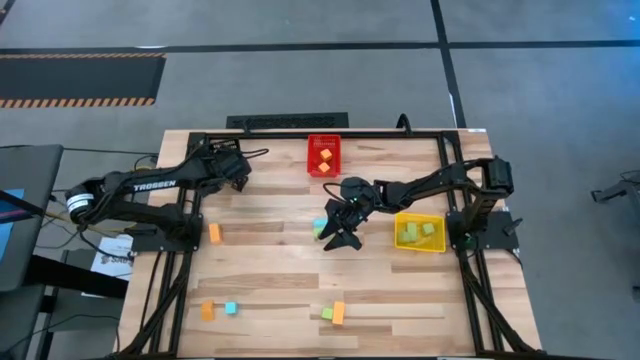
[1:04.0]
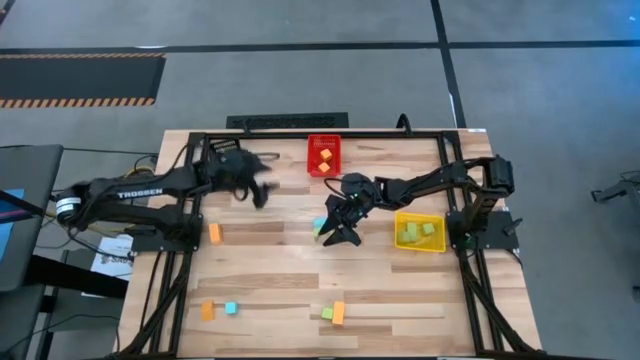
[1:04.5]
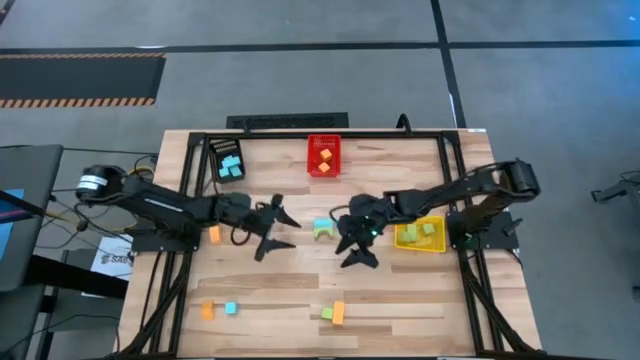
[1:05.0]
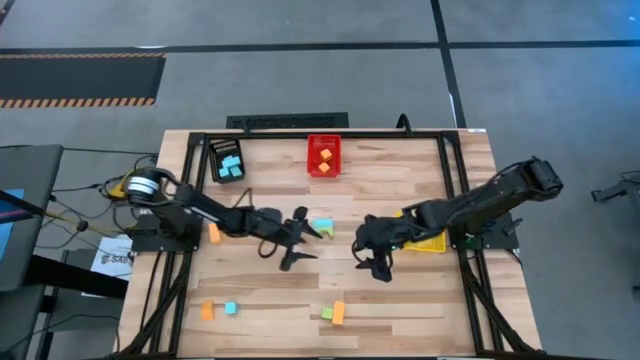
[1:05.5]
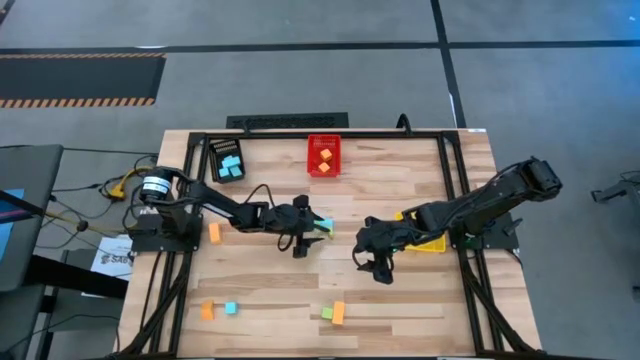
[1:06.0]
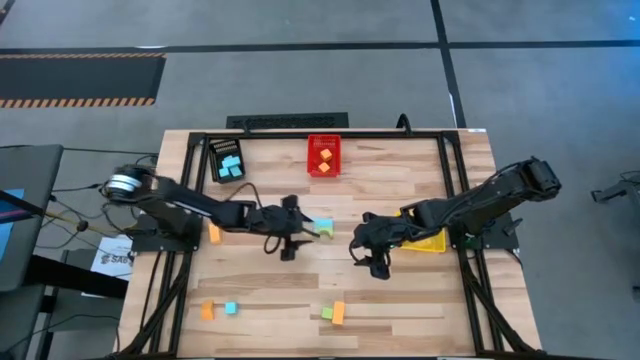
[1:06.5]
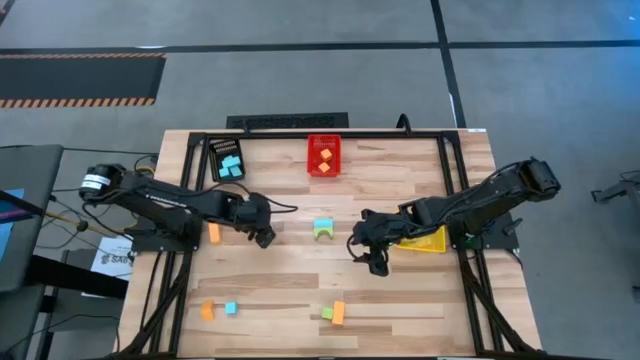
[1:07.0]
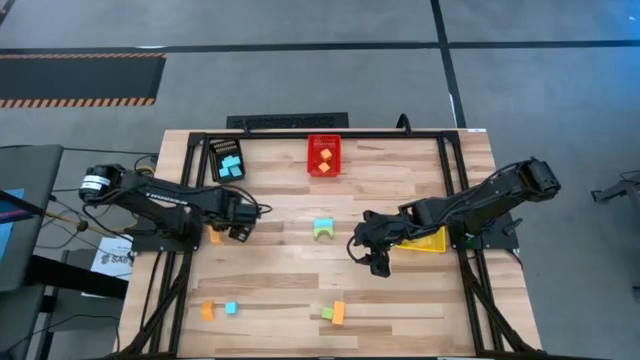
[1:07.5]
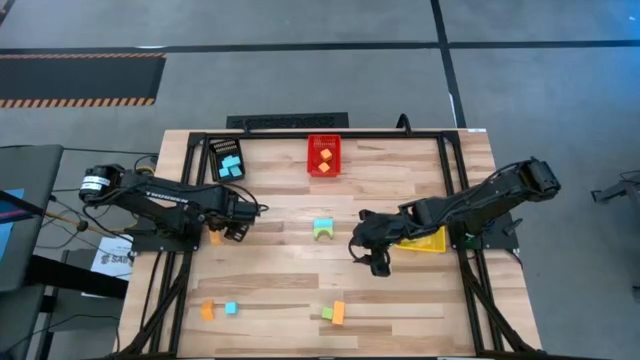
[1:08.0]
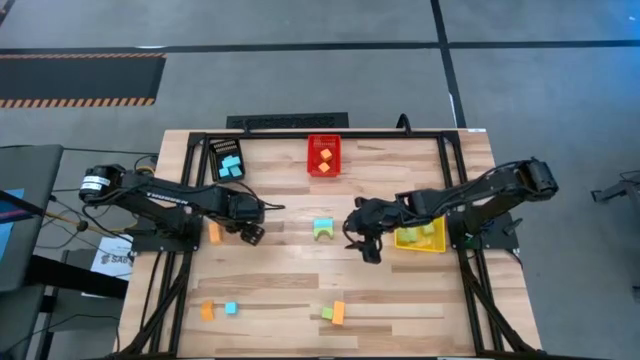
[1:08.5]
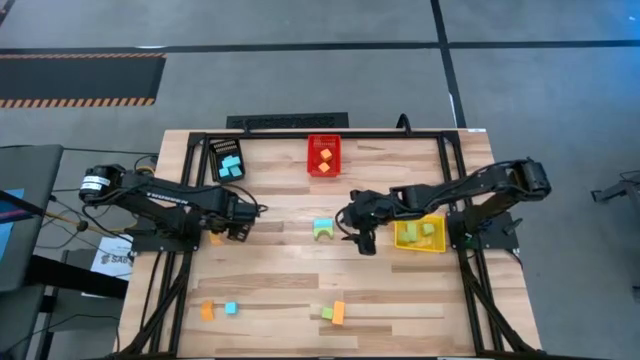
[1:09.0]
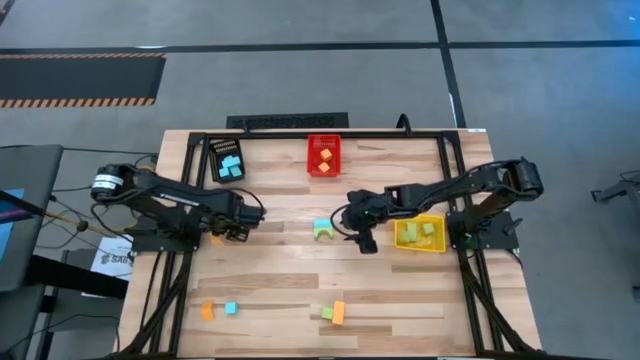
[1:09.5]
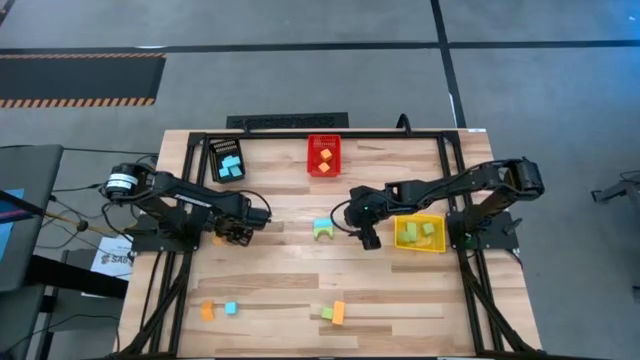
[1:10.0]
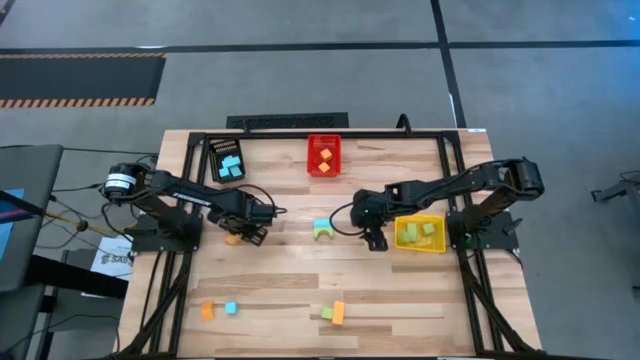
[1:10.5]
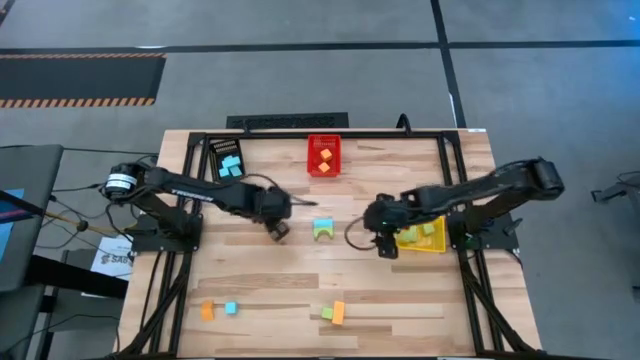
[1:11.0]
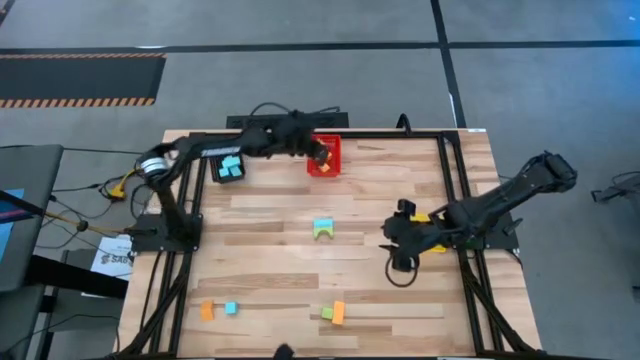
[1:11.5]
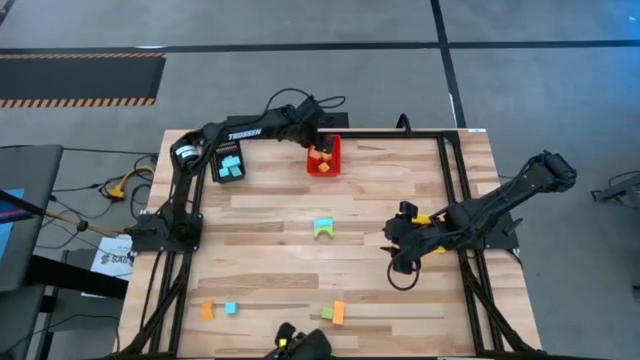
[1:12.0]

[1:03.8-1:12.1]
Task: Sort & place blocks by color
Put the orange block into the red bin

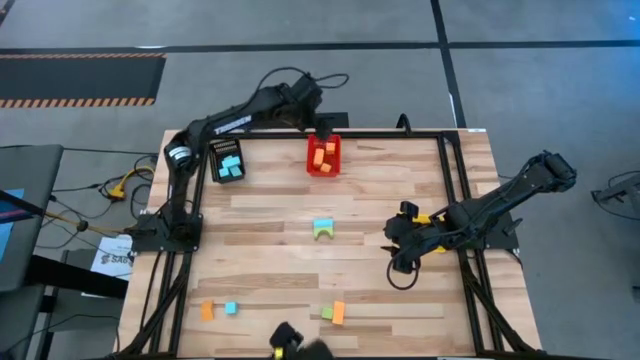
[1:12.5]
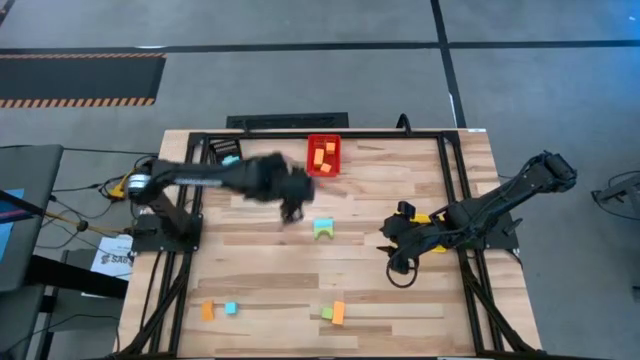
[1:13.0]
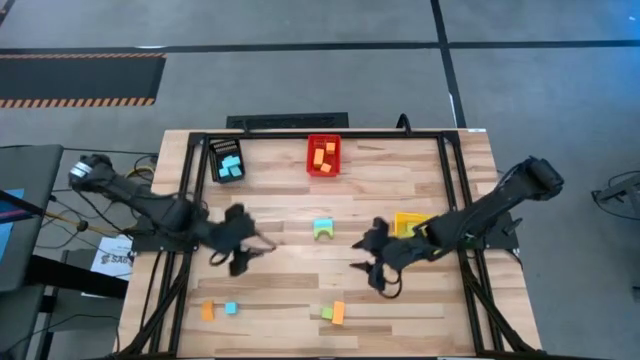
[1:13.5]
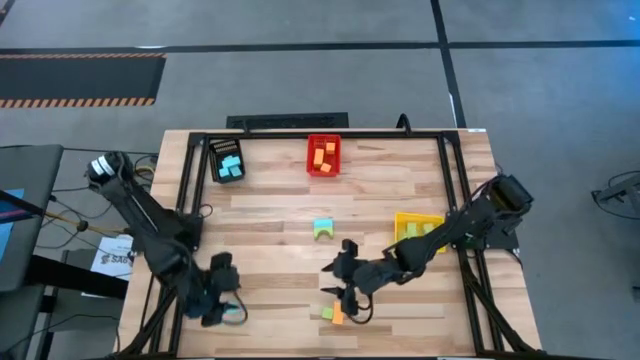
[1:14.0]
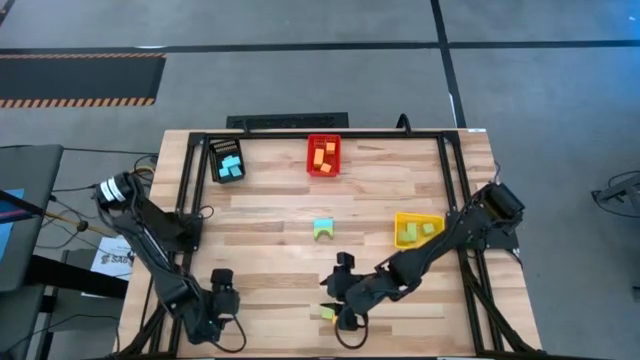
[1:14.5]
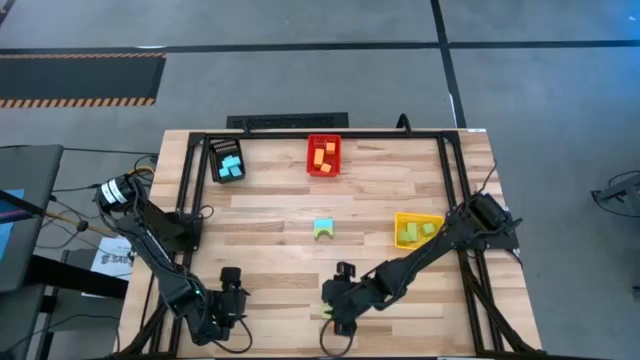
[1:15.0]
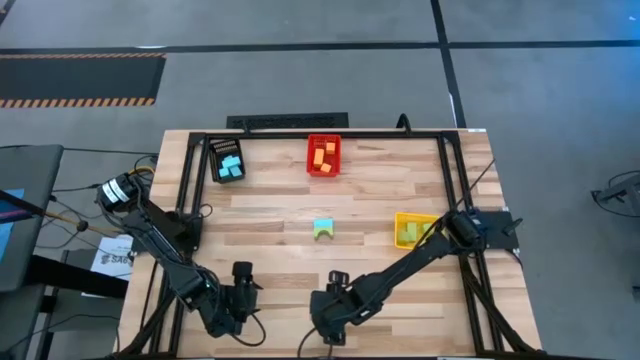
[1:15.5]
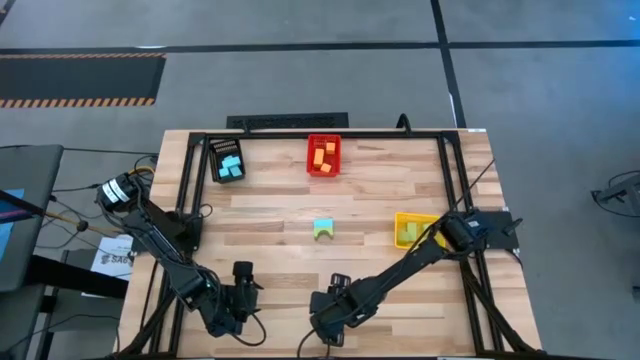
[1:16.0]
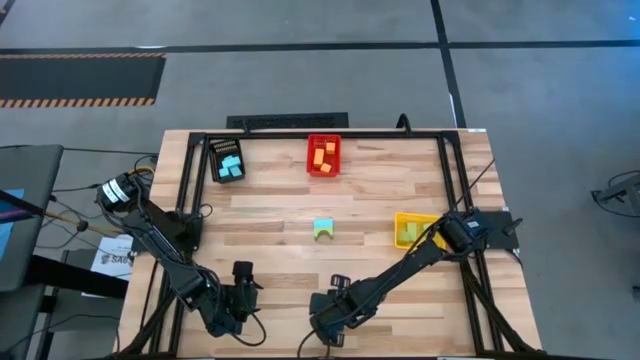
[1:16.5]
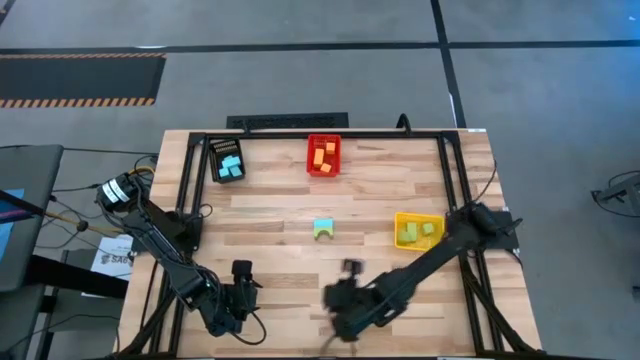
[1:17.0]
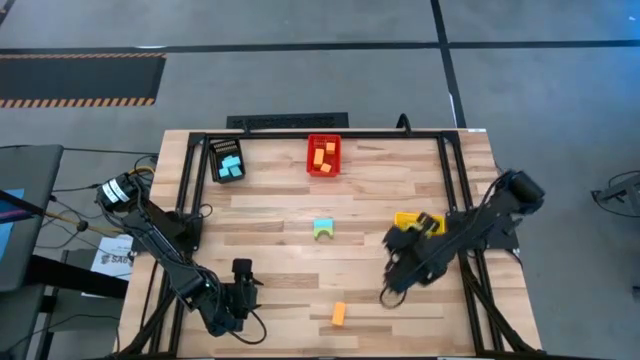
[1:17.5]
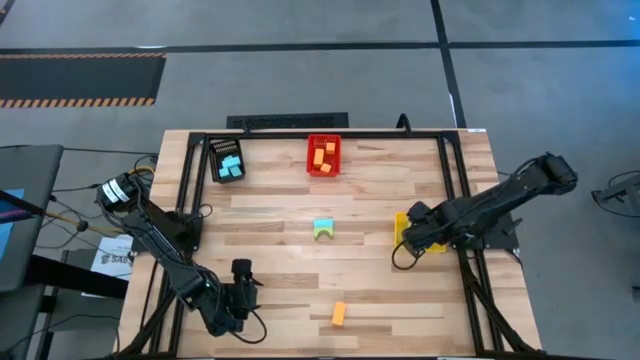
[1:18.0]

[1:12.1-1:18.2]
Put the green block into the yellow bin

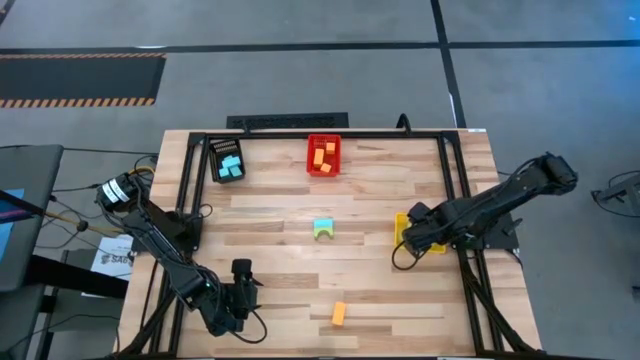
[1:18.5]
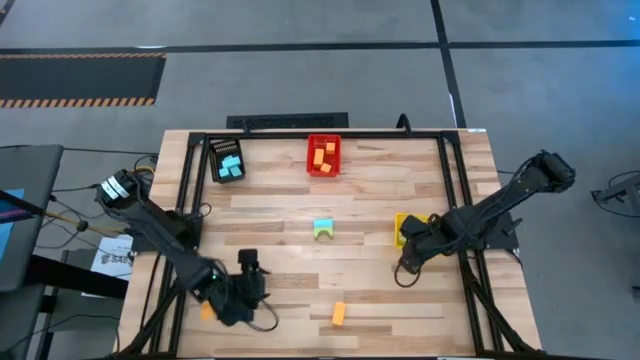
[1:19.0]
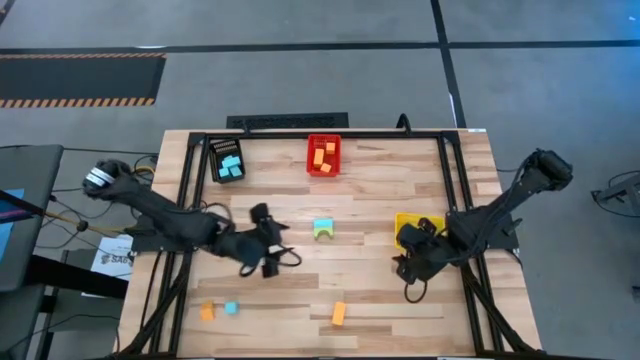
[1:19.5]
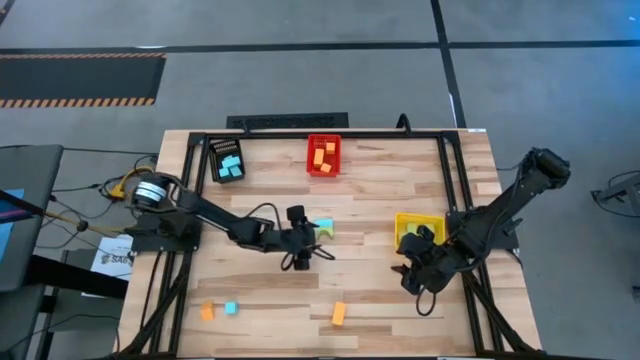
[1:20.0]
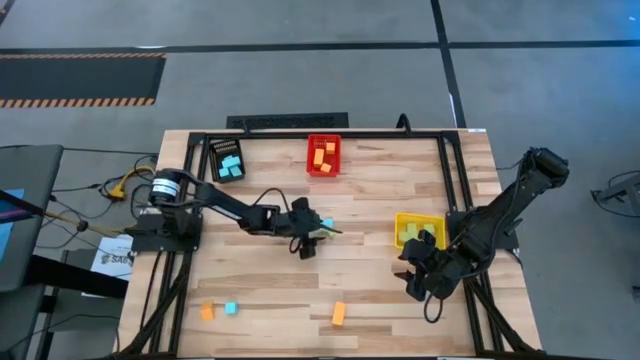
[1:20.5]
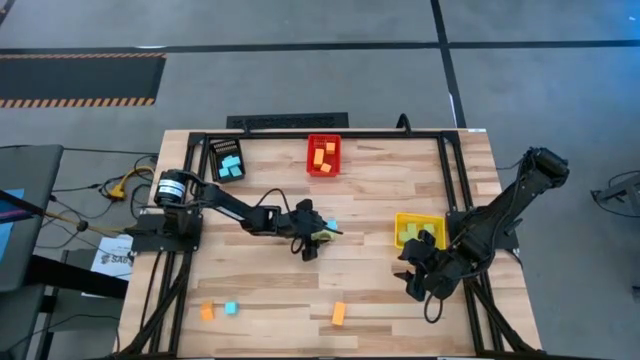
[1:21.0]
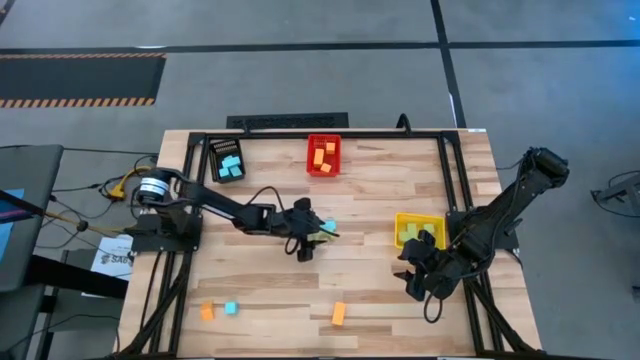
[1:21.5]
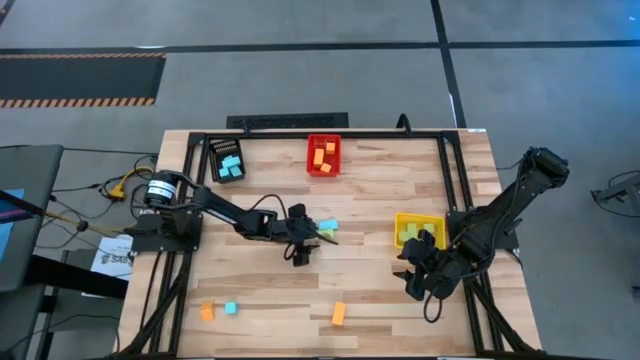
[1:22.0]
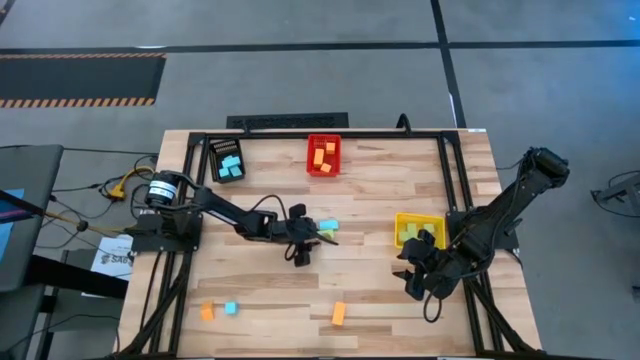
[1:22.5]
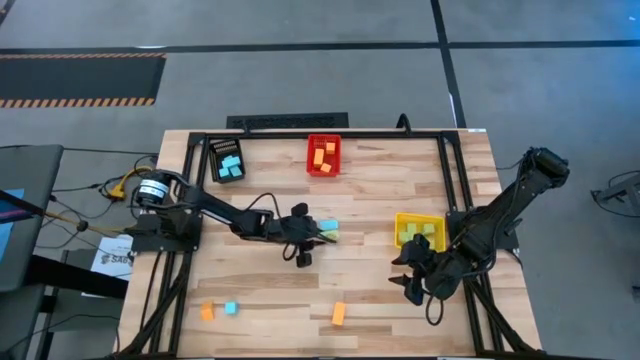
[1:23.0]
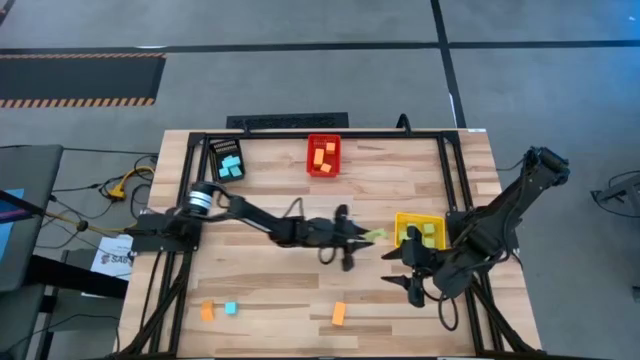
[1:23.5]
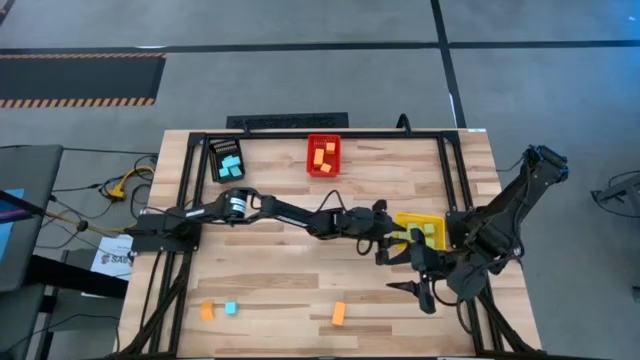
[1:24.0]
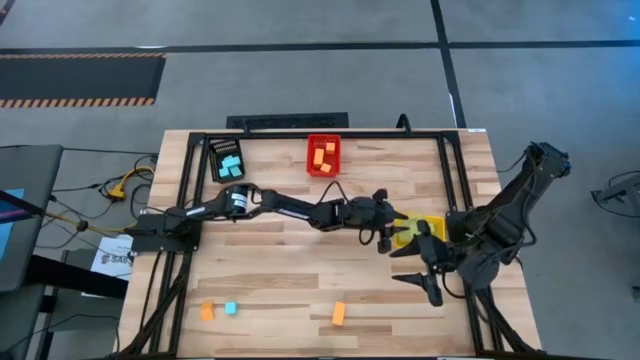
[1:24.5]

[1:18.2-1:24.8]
Put the green block into the yellow bin

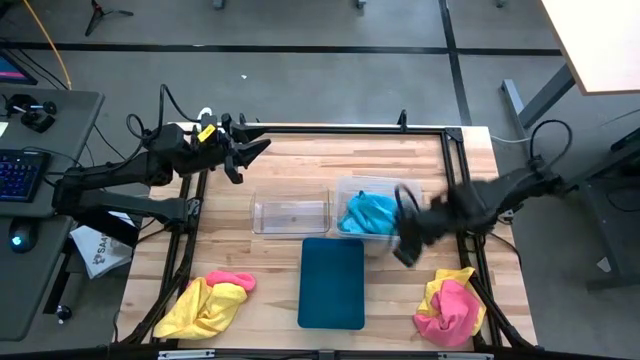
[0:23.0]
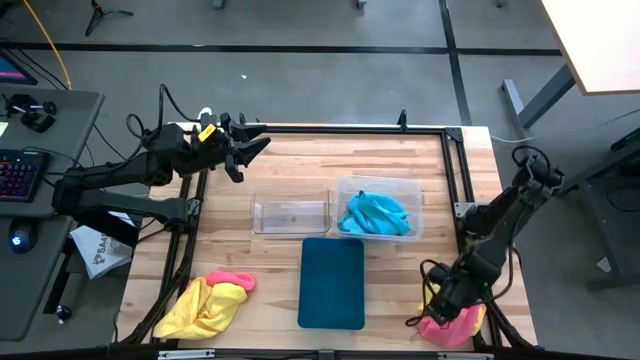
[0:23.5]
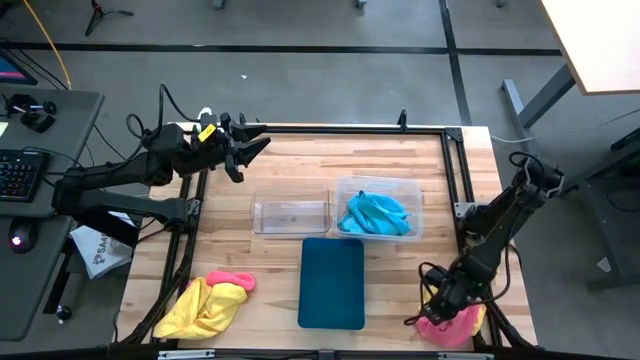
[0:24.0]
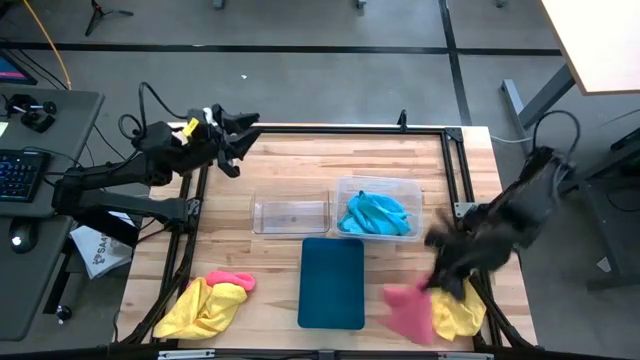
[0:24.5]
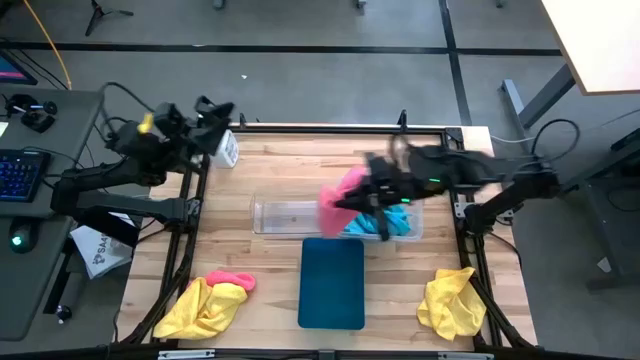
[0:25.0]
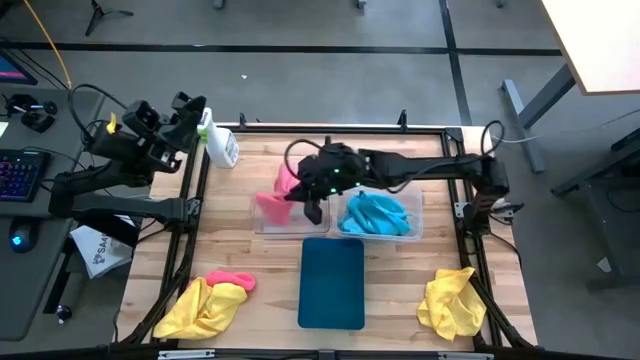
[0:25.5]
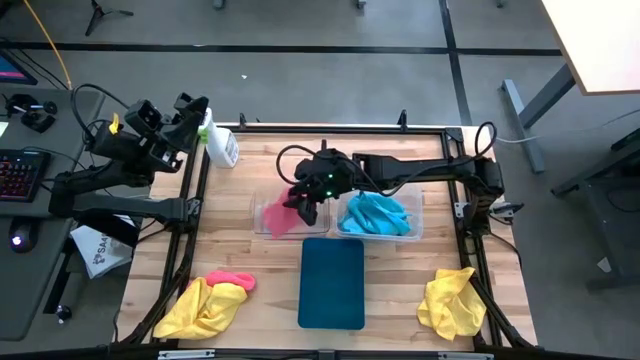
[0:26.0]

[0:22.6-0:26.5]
Task: Sort microfiber towel by color & place in baskets
Put the right pink microfiber towel into the transparent bin
